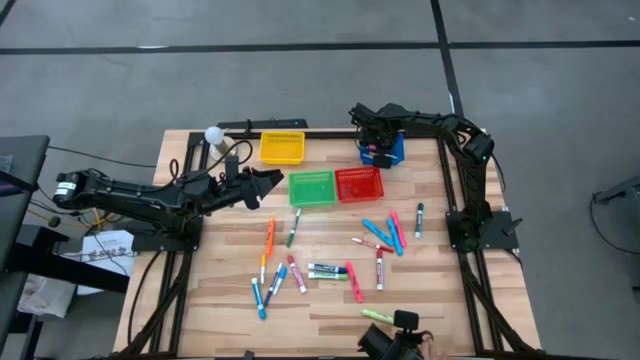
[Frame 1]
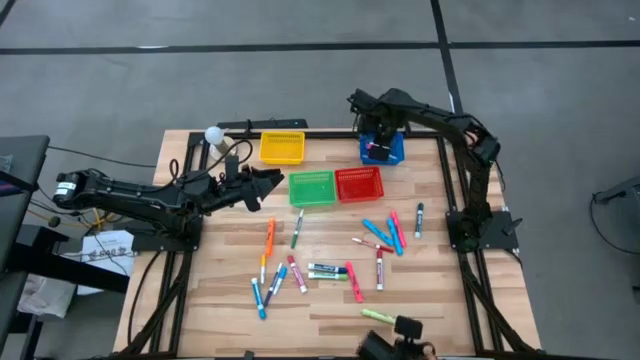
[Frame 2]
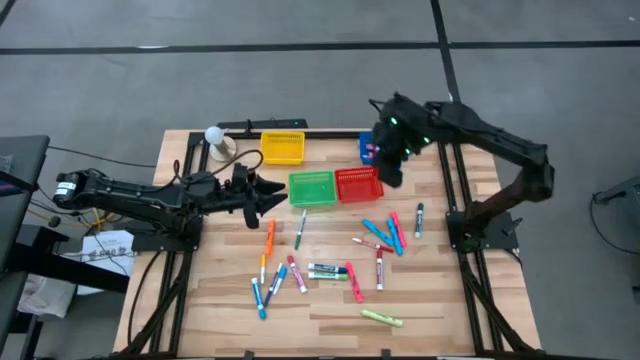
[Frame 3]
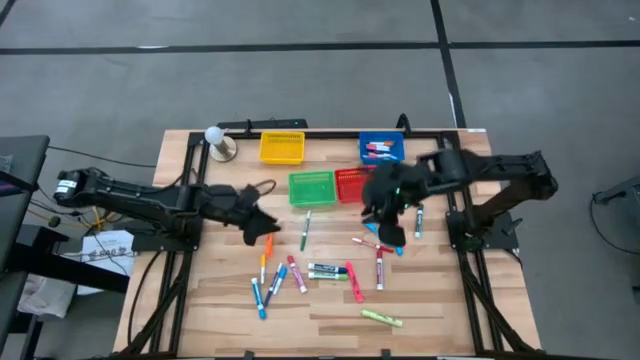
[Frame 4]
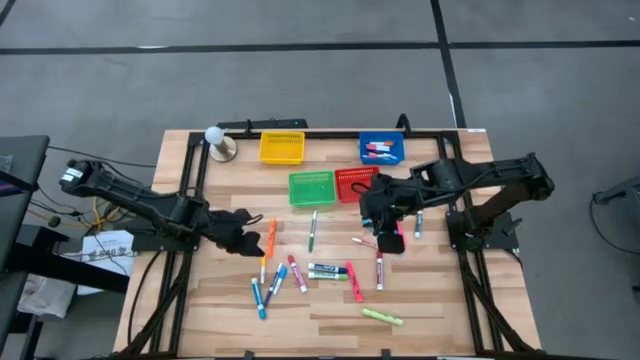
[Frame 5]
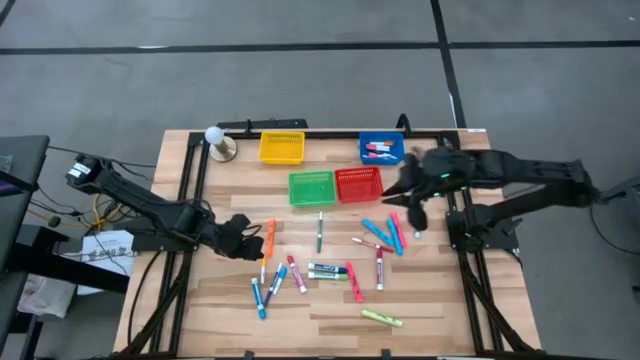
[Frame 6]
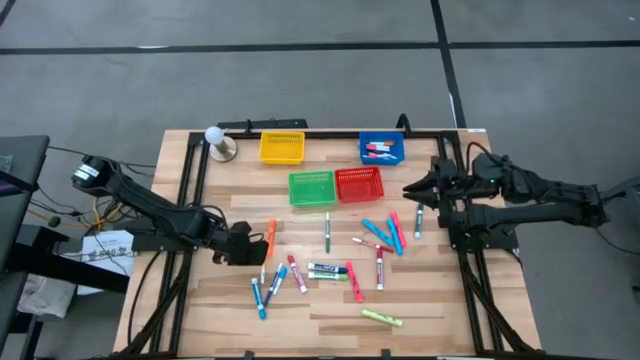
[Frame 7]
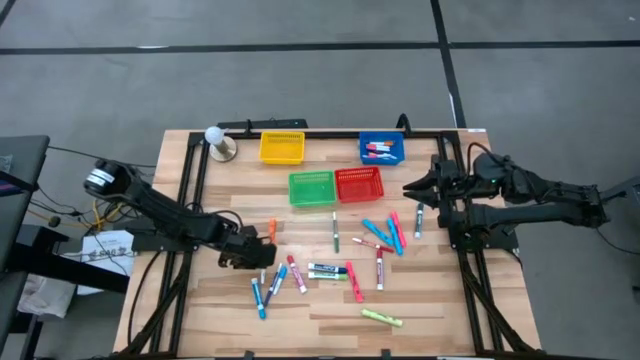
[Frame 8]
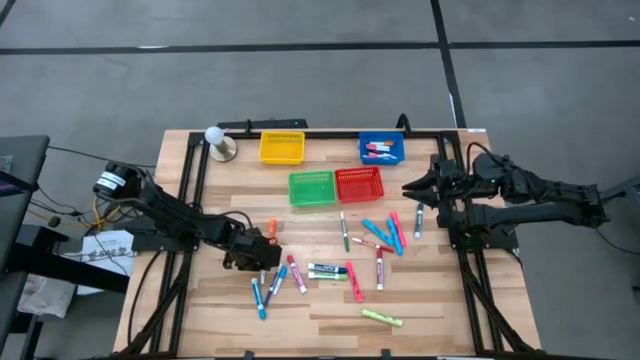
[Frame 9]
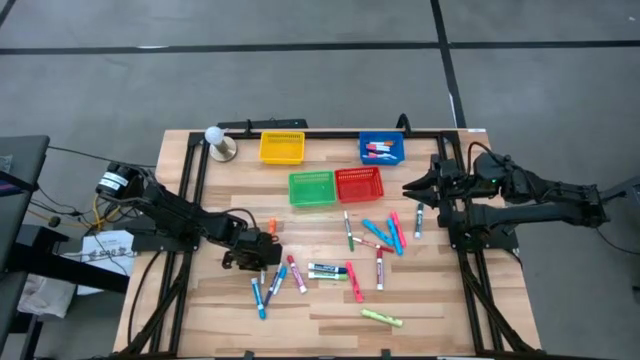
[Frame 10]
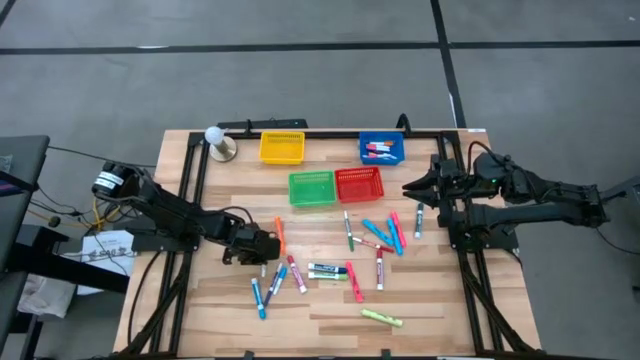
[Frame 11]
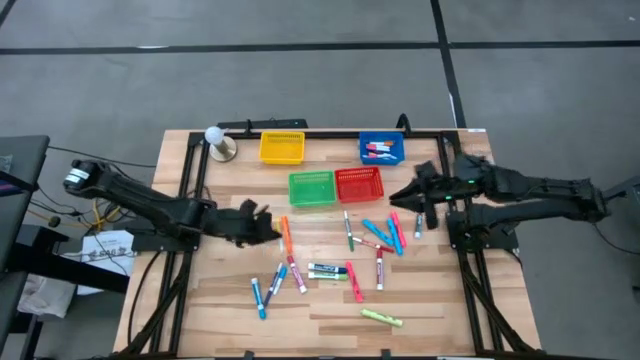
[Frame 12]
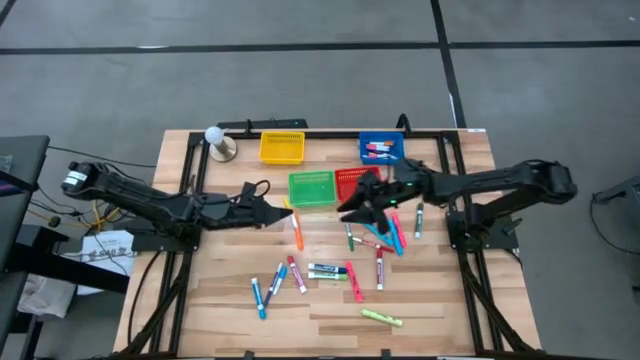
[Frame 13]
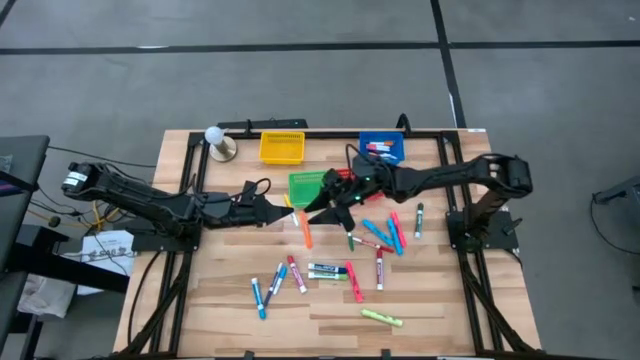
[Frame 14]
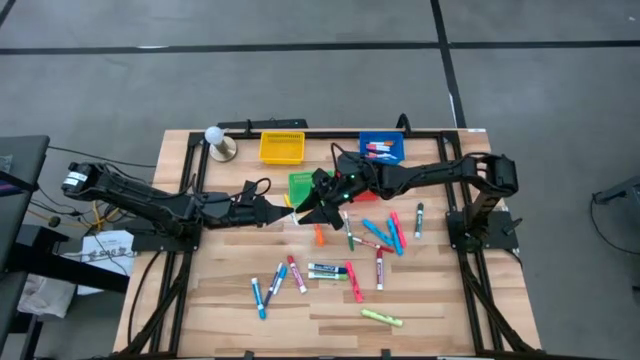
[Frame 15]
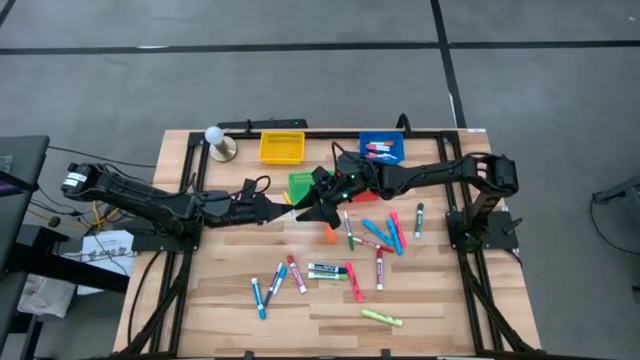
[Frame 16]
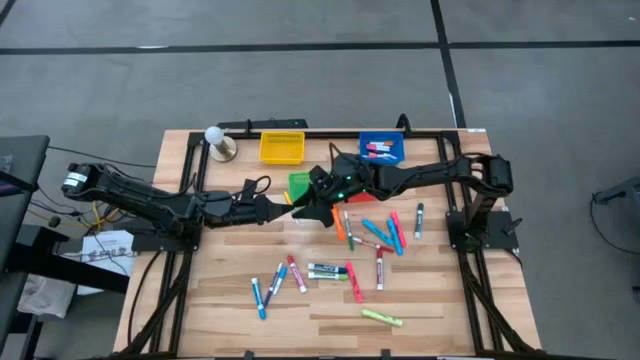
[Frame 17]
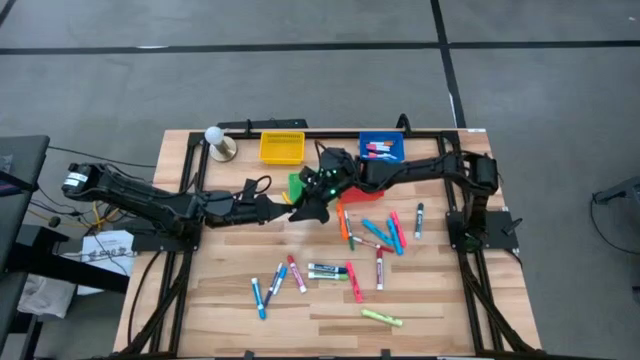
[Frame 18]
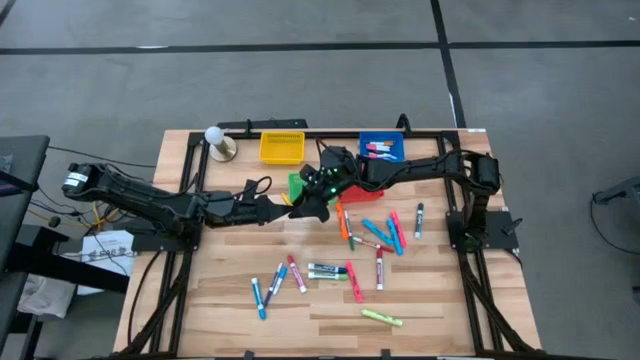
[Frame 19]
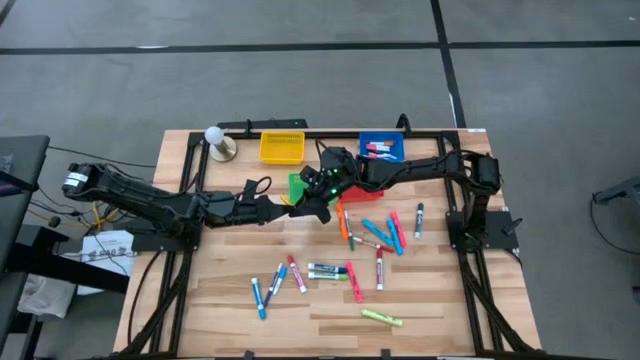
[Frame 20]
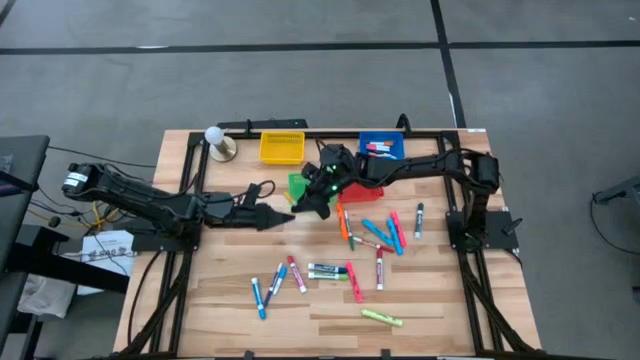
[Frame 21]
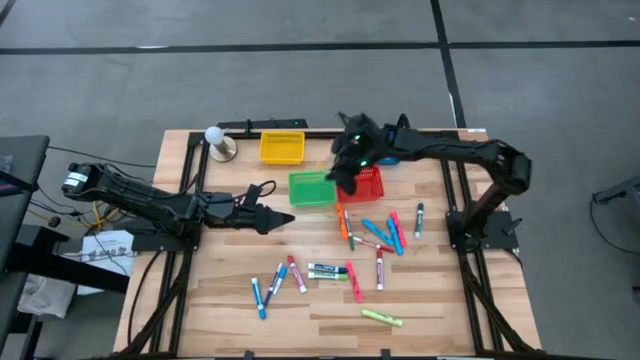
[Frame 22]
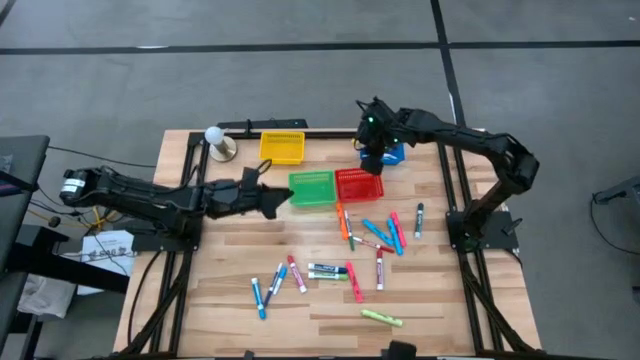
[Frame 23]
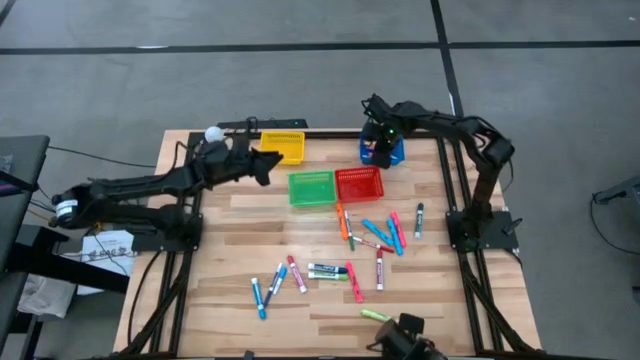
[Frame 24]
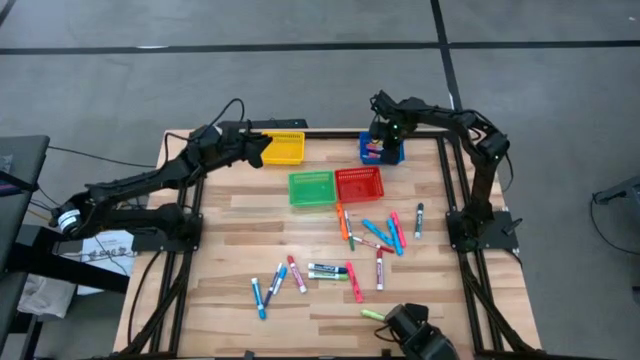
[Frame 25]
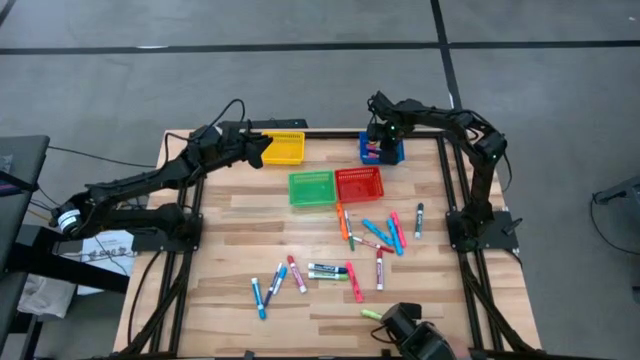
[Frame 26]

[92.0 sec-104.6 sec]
Task: Pick & Place Markers
Put the yellow highlighter pen into the blue bin

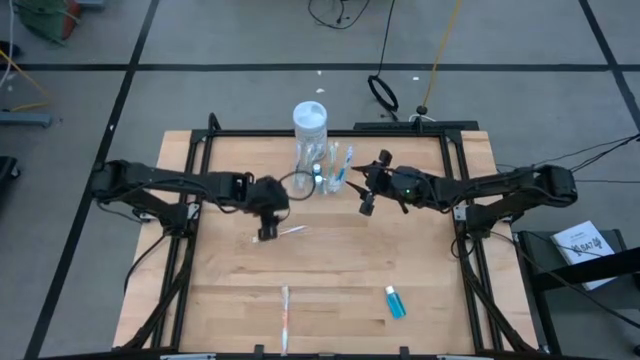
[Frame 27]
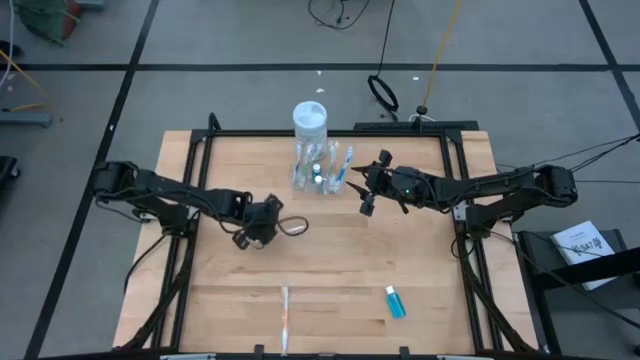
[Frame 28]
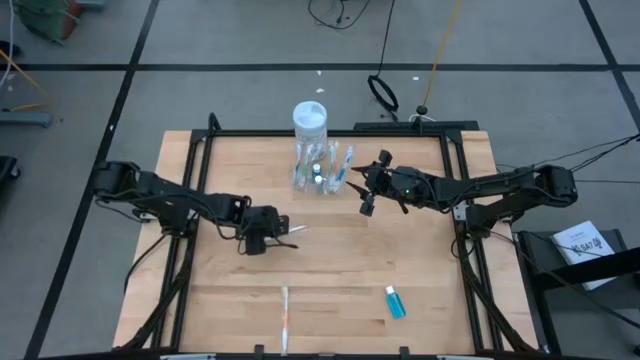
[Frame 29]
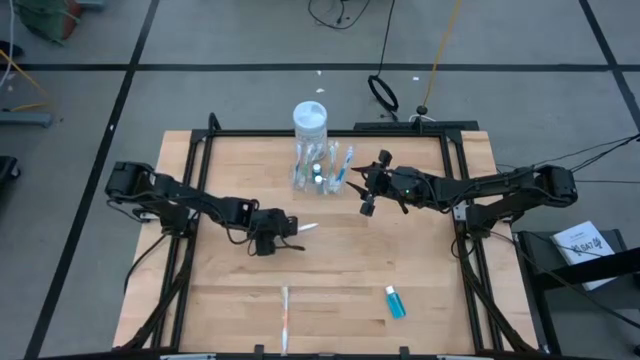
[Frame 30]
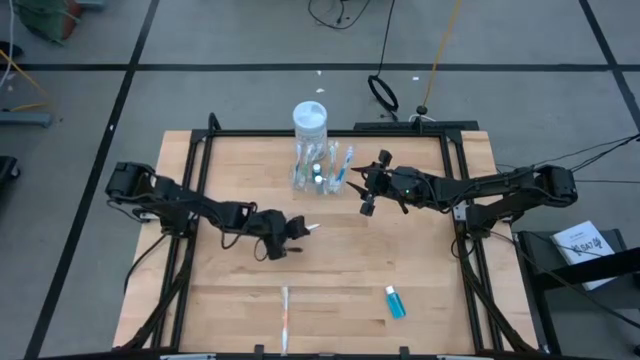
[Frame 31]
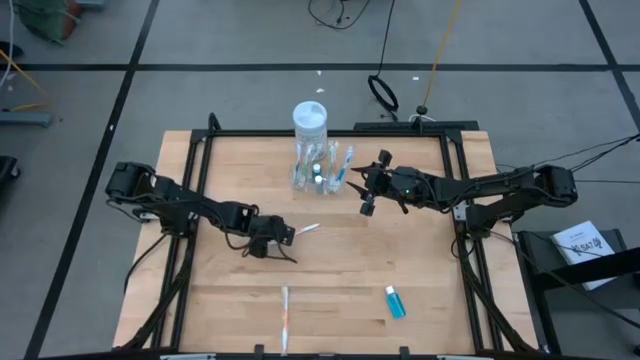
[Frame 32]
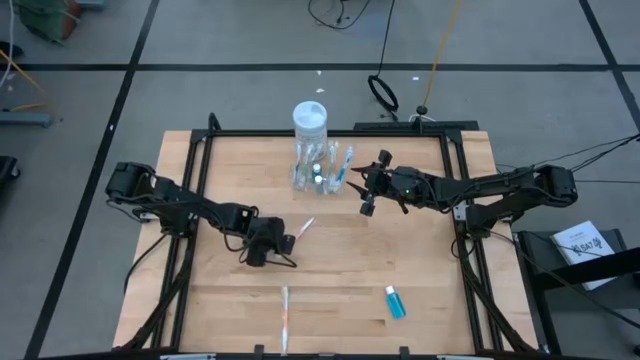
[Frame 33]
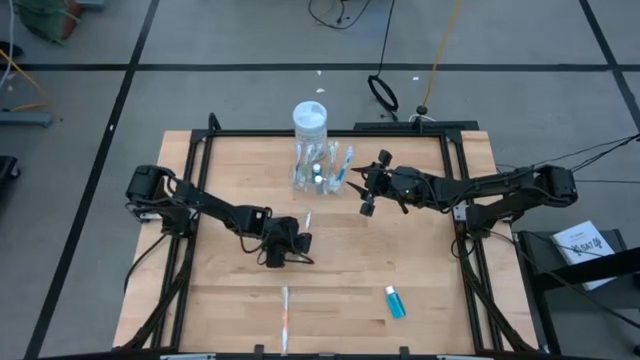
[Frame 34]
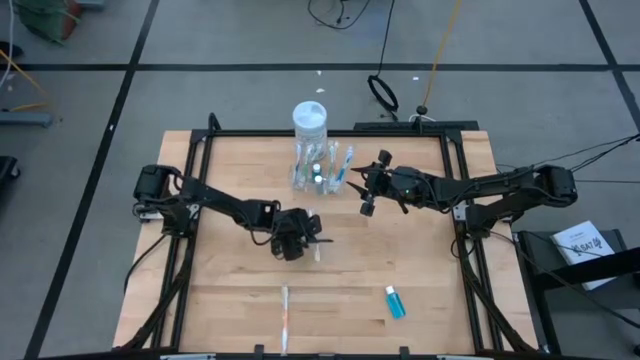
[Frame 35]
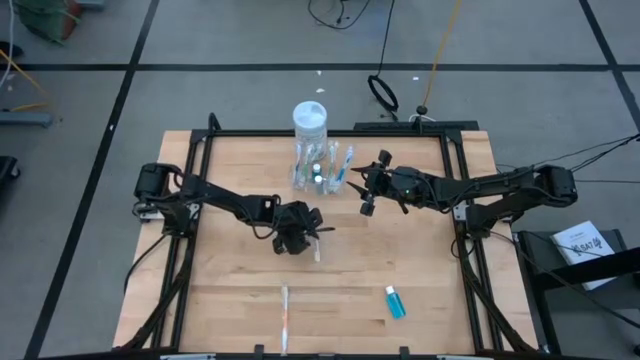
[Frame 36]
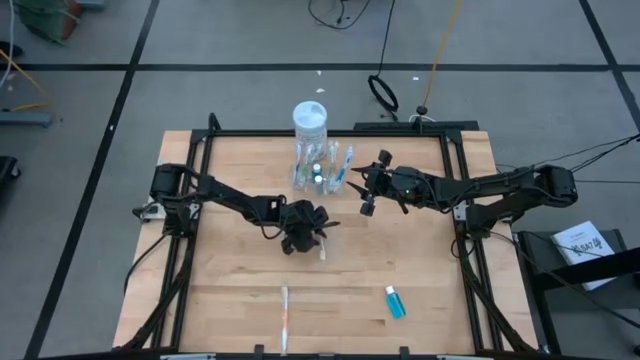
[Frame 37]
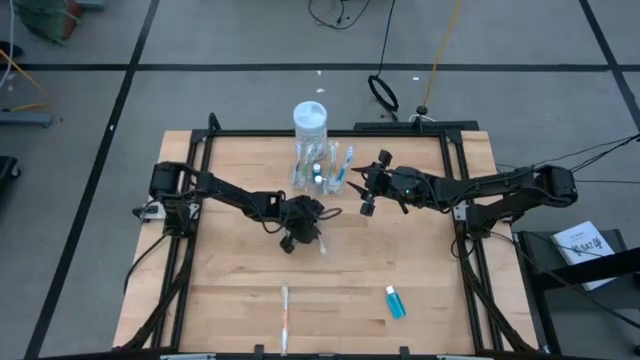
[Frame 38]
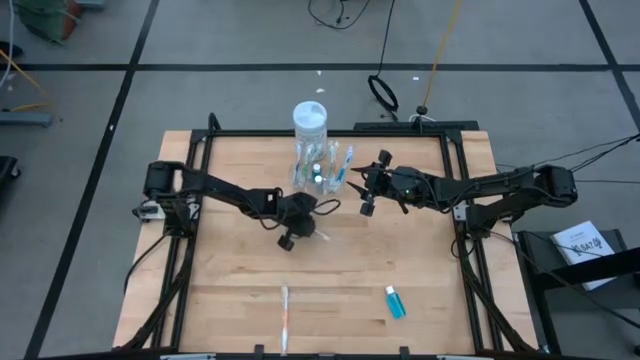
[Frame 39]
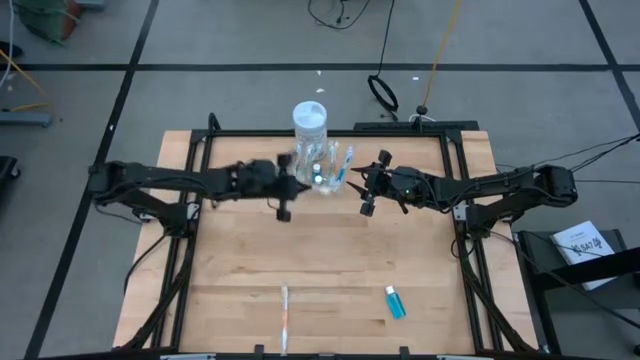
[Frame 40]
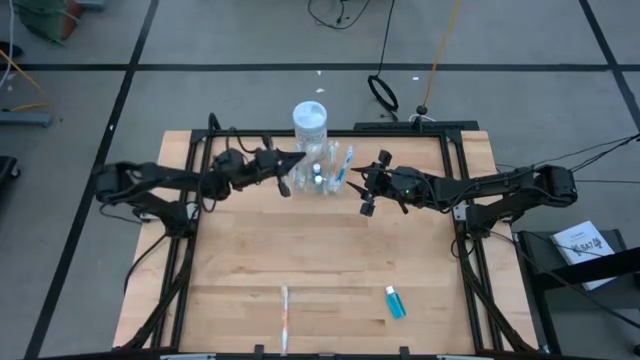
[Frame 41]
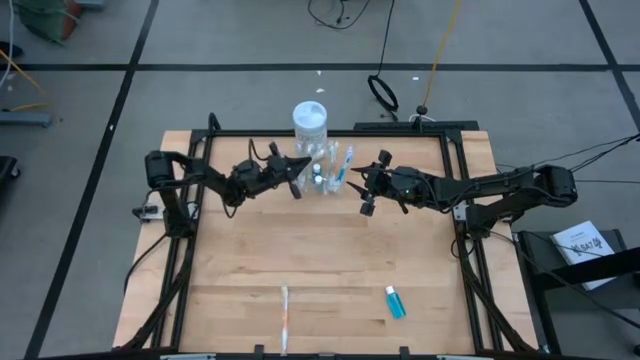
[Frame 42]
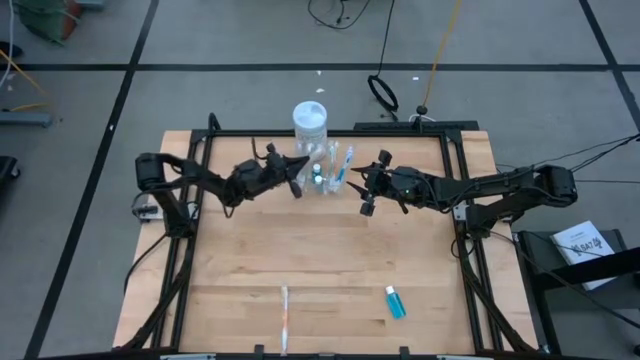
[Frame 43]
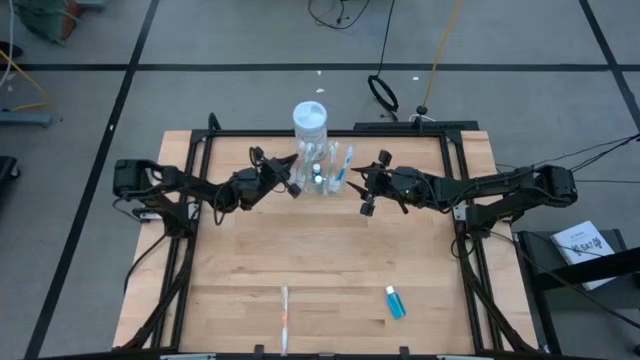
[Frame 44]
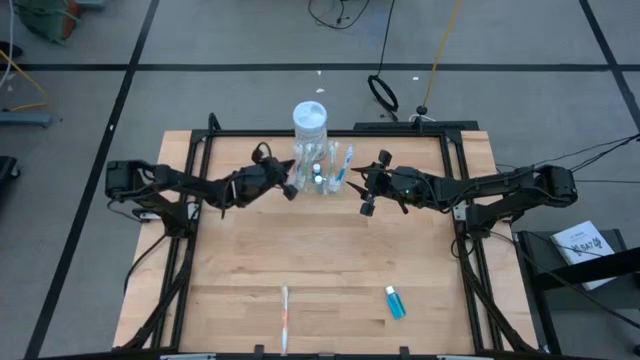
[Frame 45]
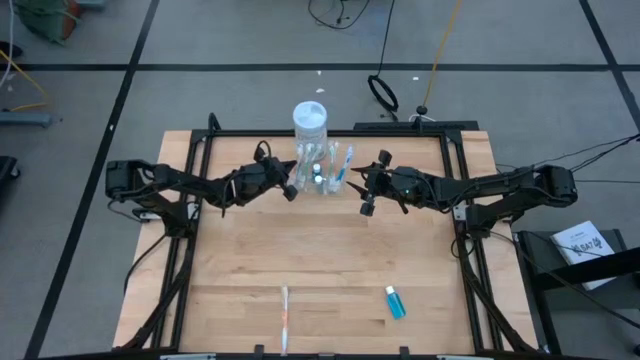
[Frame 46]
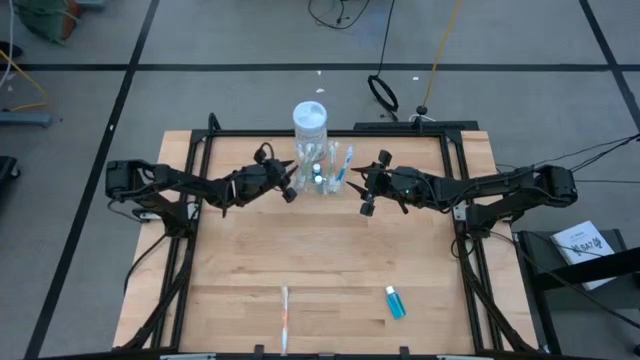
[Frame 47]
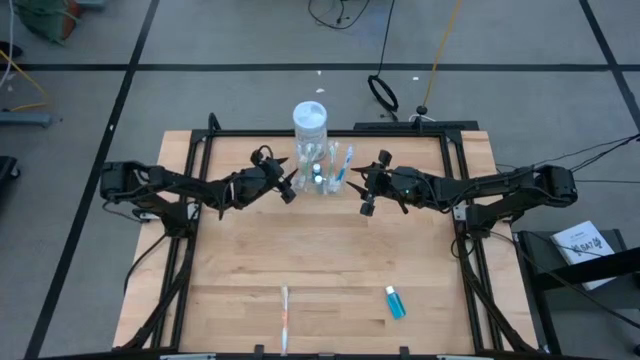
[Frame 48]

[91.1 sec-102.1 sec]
Task: Pick & Place toothbrushing station
Put the orange toothbrush into the transparent organizer
